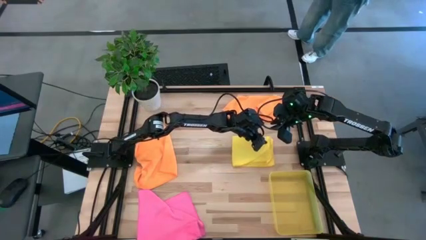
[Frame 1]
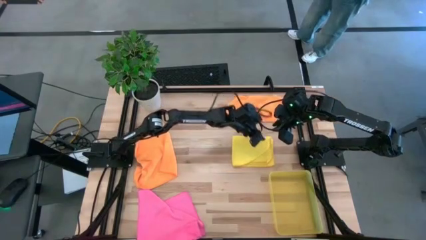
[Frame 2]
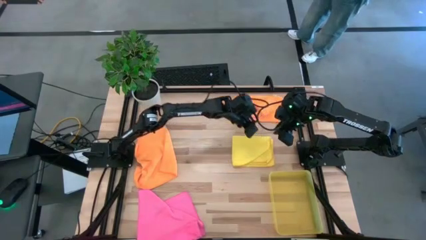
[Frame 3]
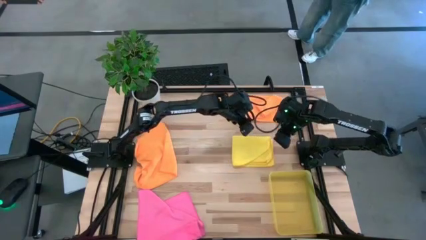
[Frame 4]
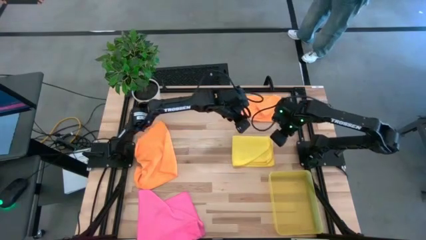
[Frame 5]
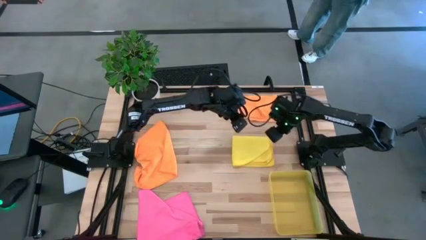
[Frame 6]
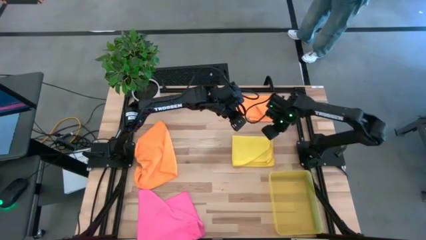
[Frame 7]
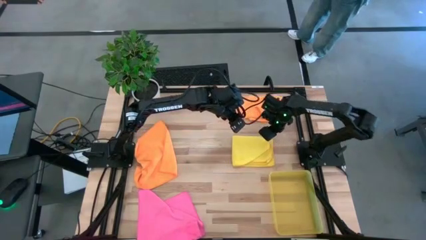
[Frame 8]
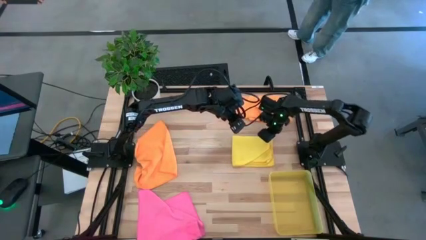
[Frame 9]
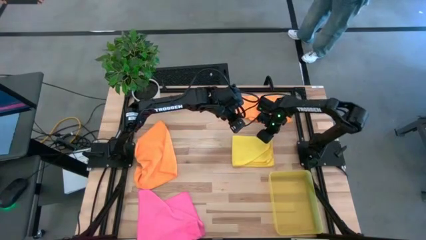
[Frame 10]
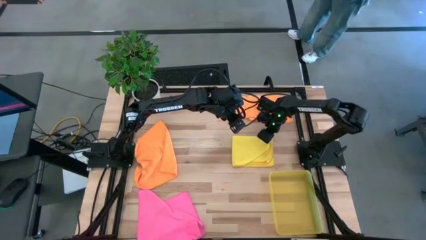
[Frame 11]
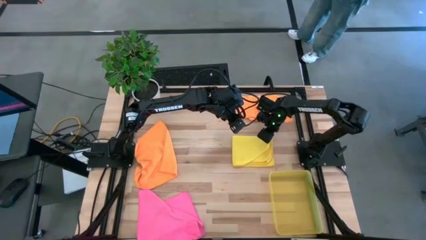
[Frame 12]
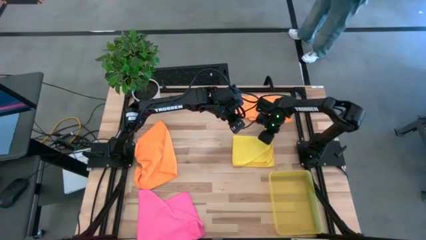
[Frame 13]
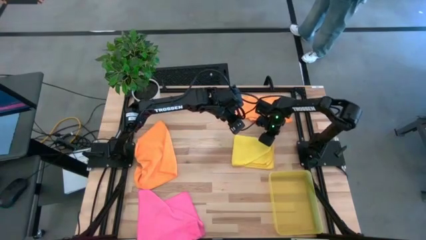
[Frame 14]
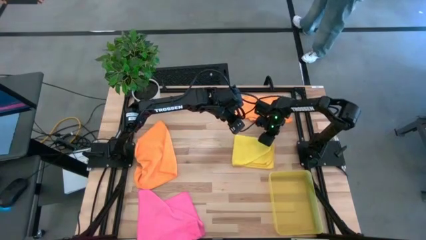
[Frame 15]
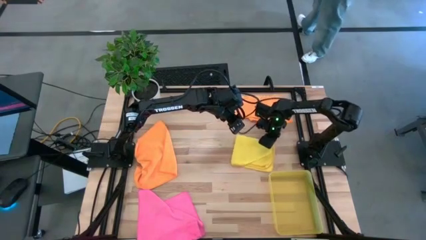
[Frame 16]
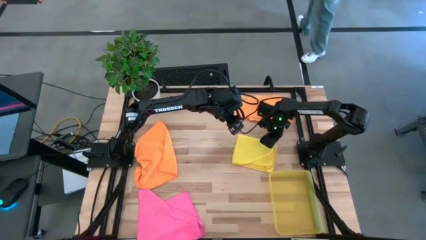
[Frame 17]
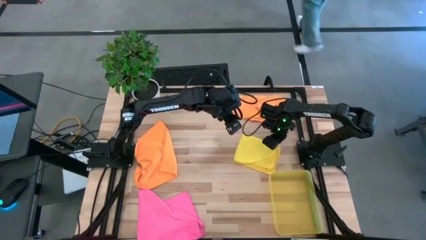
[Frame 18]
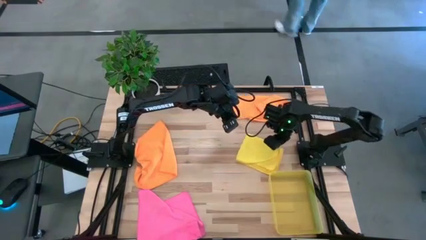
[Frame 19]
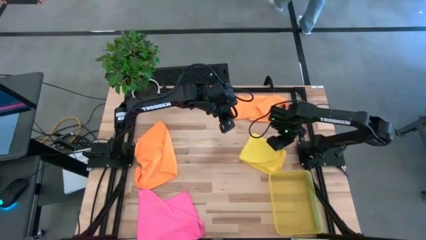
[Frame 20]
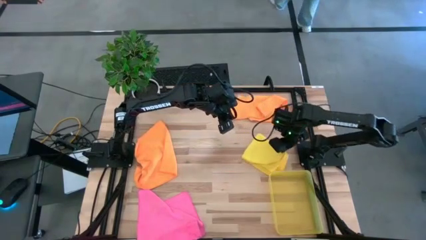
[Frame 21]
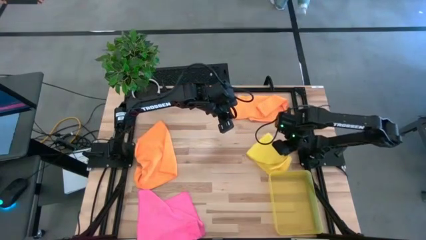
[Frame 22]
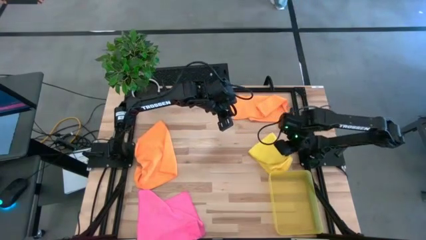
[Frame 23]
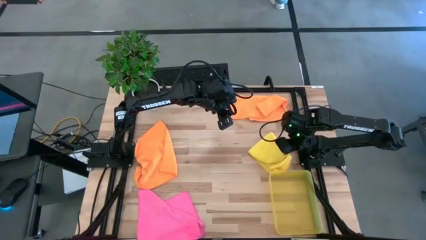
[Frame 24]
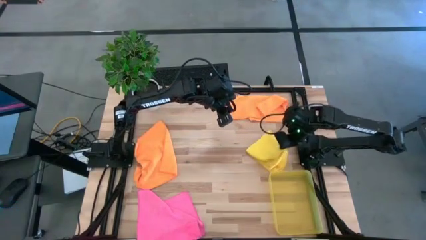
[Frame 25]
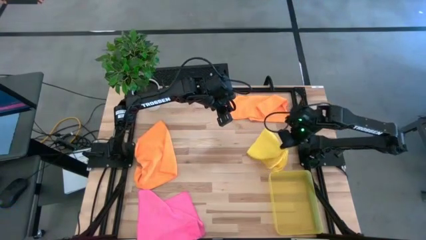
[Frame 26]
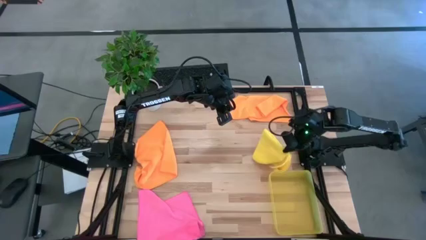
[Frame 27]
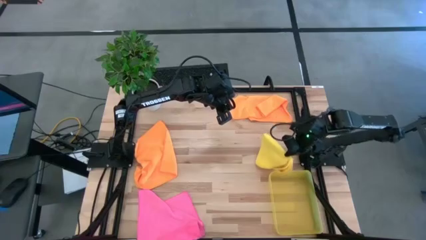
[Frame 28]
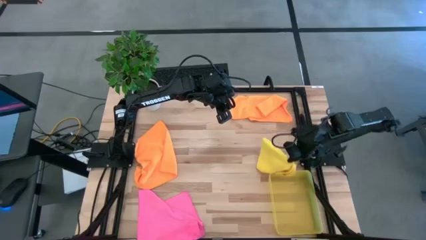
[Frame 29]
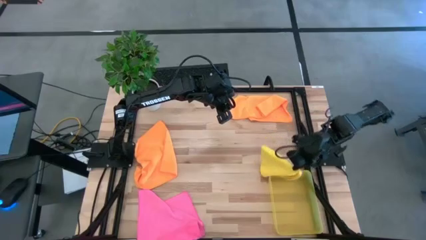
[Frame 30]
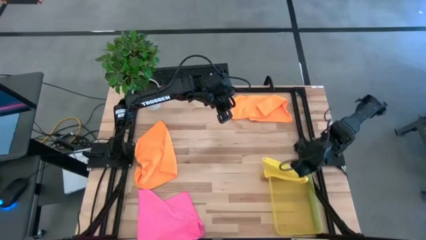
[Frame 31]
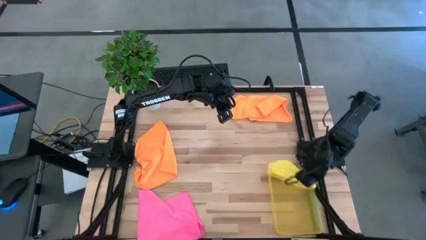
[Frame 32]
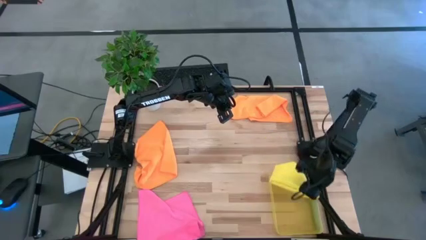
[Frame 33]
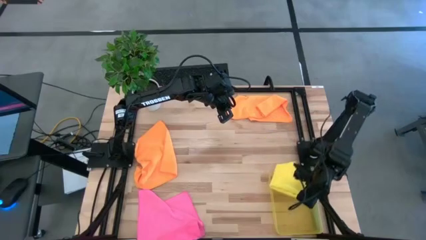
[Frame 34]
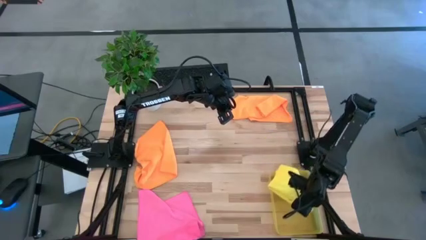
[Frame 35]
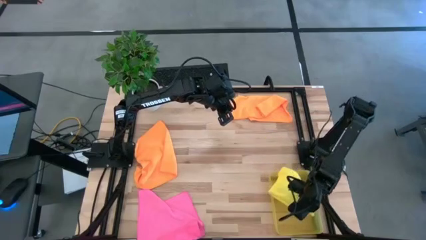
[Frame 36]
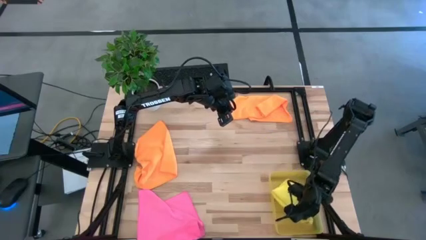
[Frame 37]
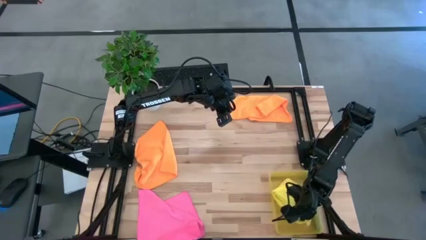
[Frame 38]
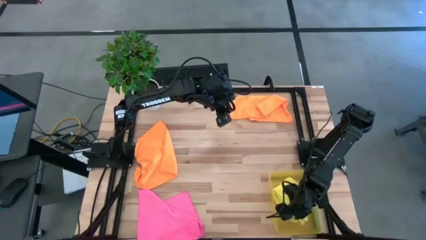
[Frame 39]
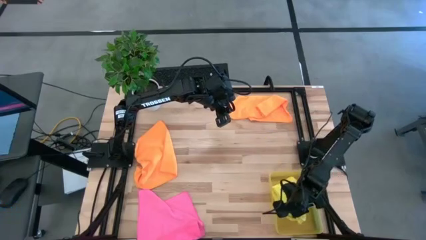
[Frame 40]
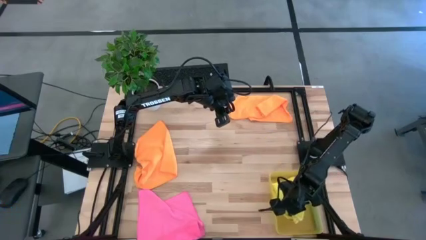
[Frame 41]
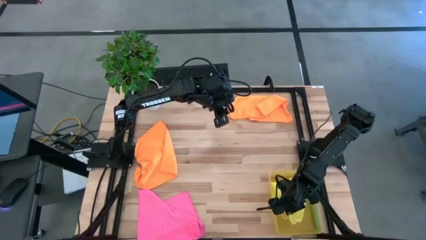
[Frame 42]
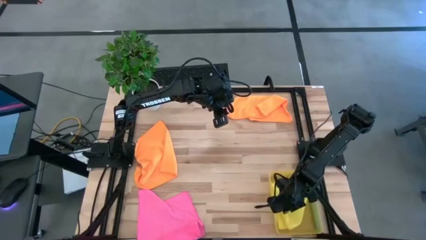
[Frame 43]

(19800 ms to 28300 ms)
Task: Fold microfiber towels
Put the folded yellow cloth into the yellow bin

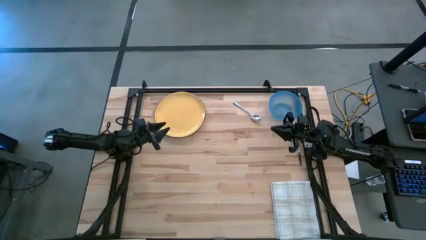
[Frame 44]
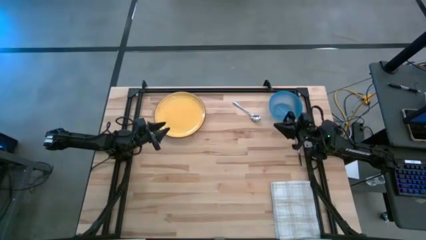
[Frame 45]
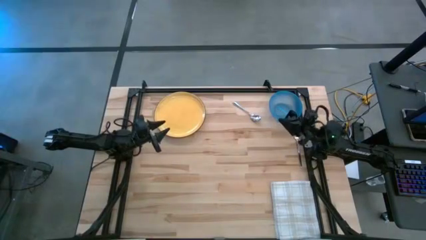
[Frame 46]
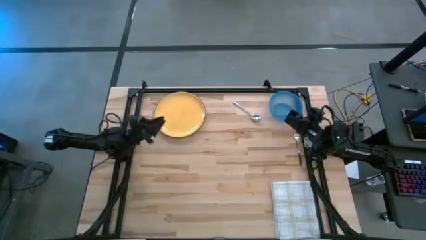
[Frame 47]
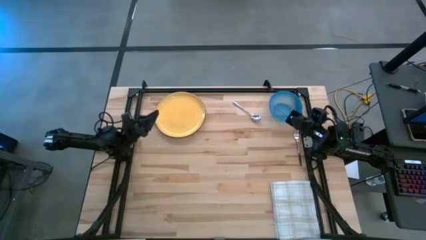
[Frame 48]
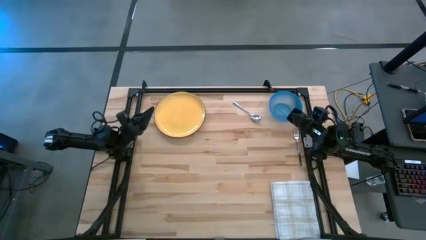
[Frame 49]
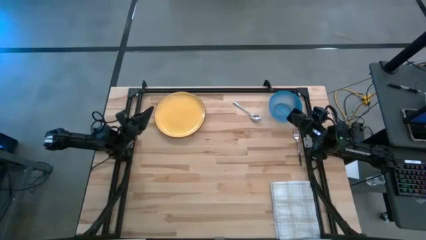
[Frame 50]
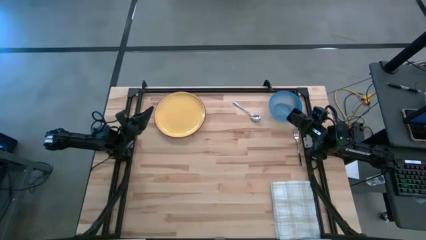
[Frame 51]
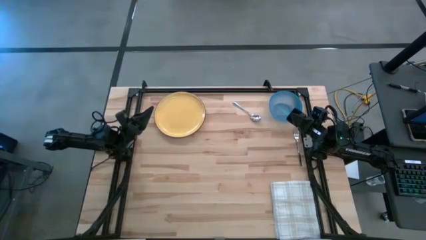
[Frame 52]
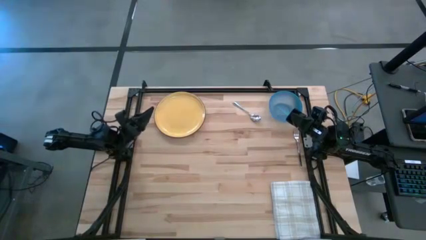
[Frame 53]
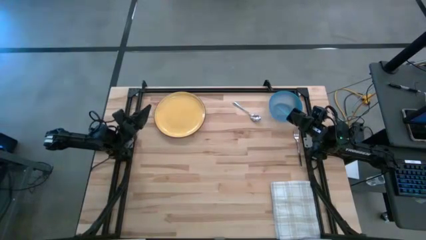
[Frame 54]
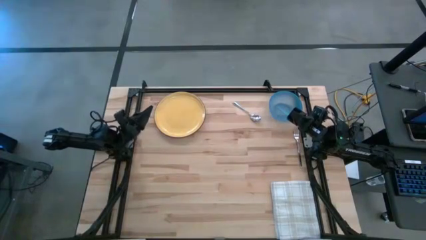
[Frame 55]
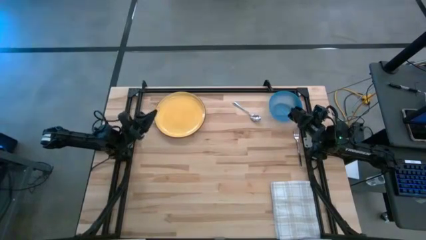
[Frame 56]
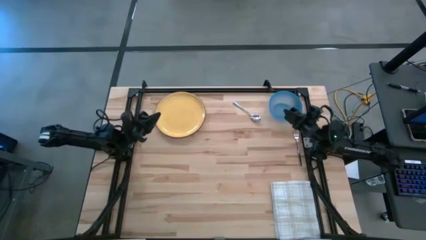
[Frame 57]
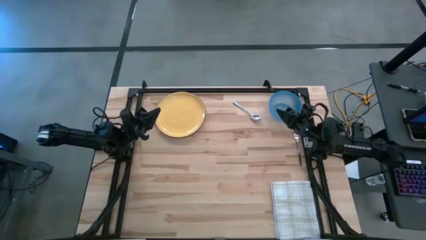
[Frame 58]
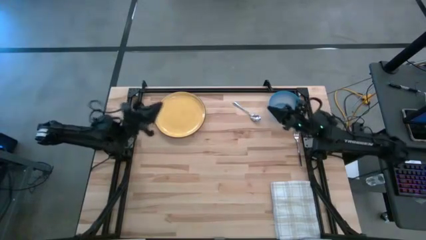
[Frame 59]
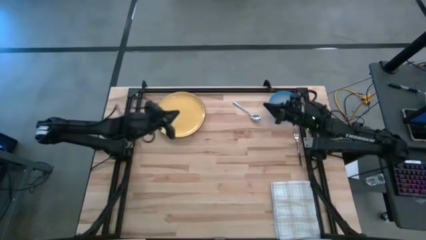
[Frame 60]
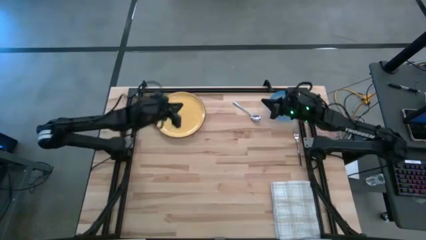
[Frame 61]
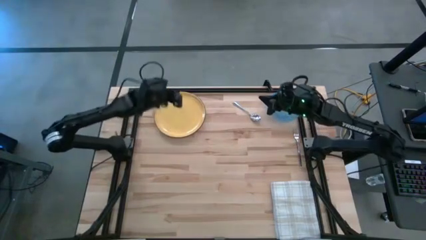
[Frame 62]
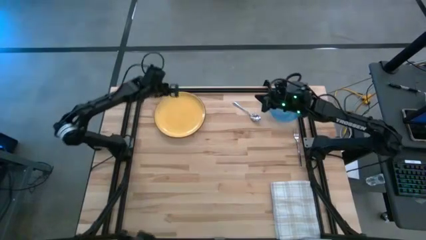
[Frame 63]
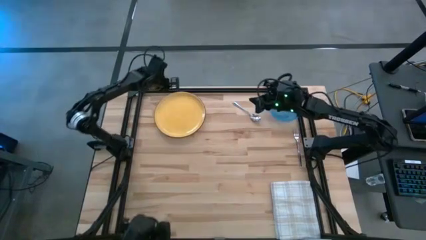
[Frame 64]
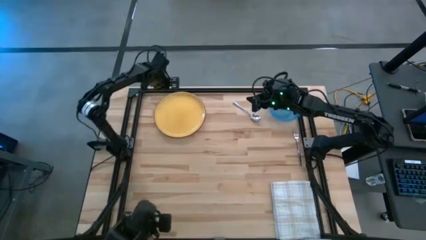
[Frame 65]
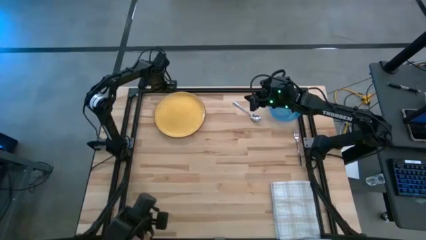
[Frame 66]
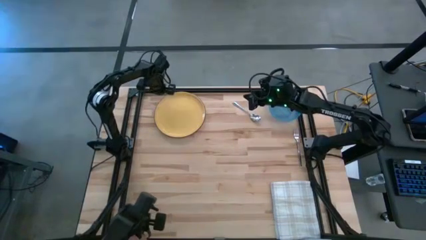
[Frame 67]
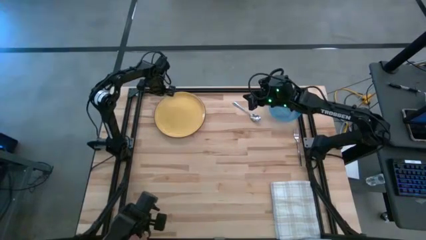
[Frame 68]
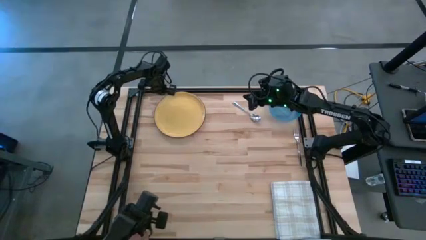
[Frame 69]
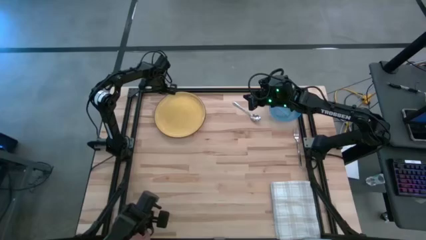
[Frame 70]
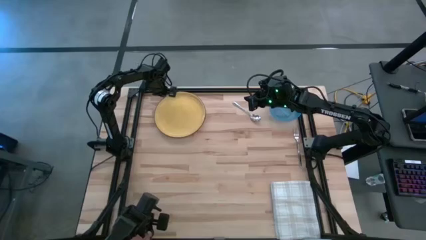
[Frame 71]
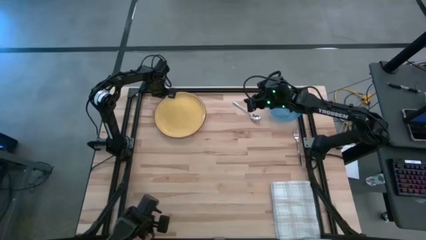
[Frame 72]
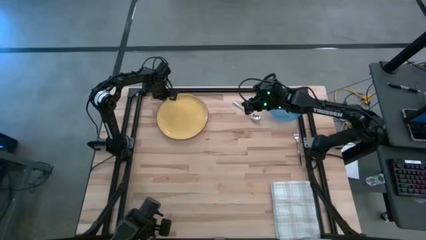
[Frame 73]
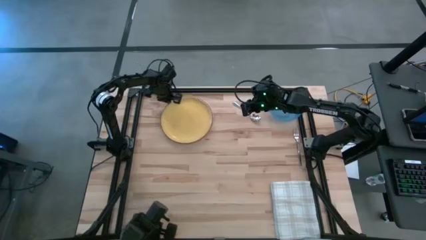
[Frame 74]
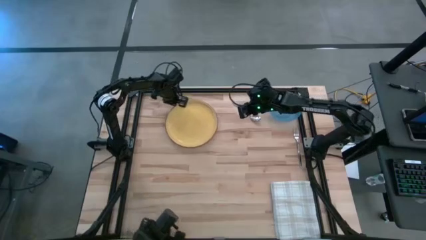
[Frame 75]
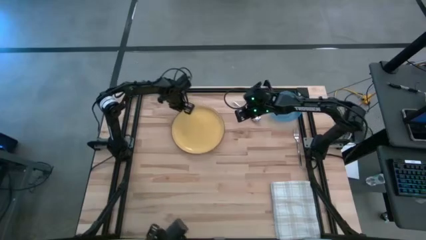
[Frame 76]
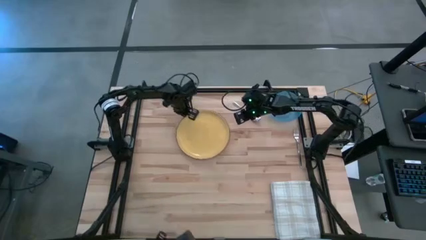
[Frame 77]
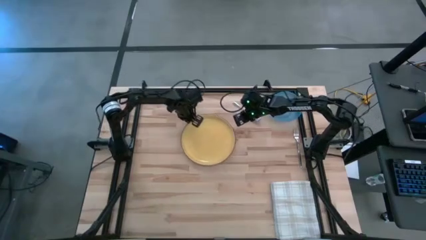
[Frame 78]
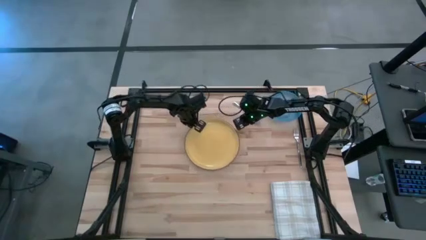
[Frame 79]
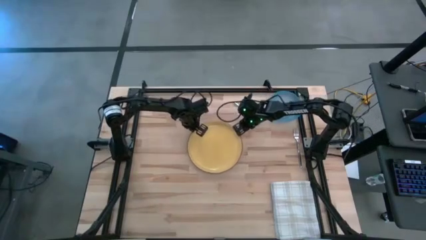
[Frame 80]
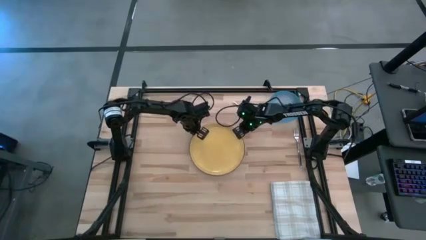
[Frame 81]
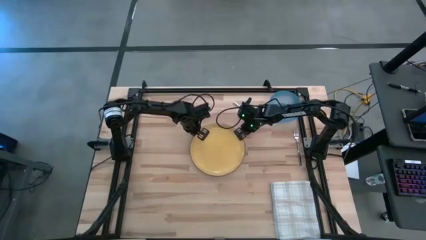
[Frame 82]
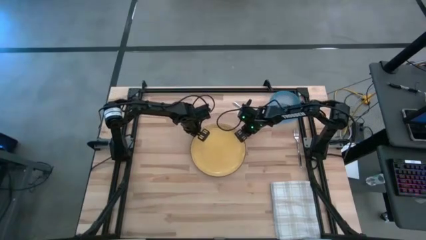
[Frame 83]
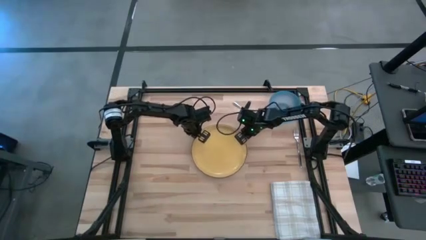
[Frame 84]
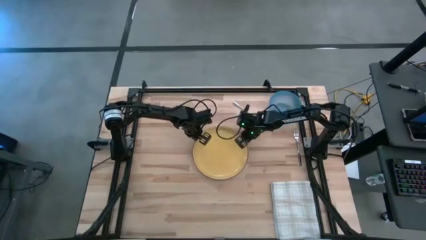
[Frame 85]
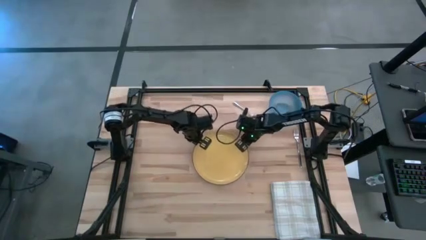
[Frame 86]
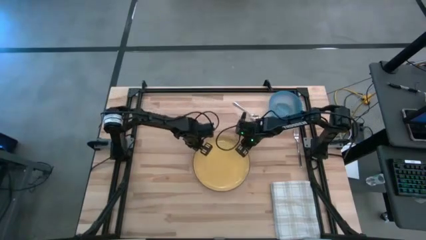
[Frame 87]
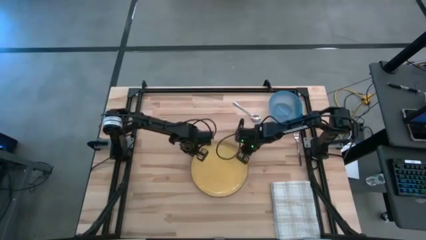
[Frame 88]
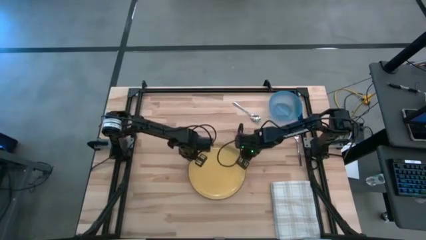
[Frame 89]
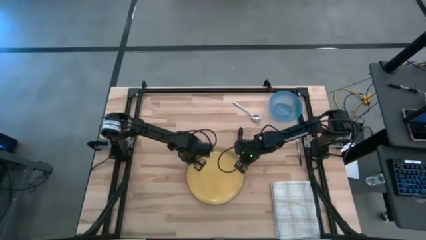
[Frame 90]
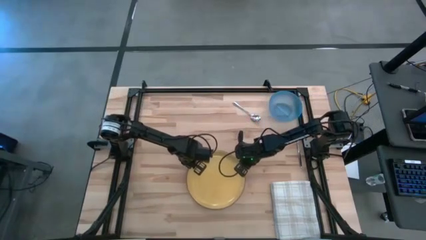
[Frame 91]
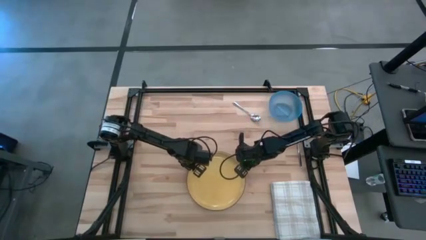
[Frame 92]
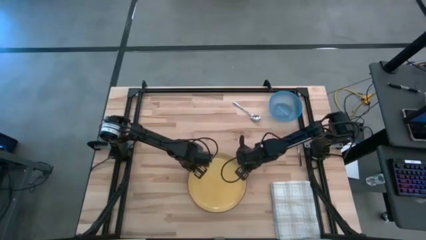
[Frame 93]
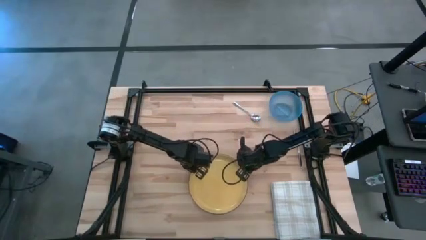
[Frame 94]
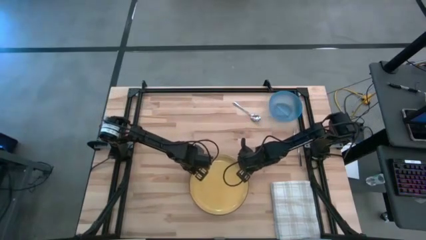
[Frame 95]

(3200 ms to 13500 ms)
Task: Set table place
Move the yellow plate to the center of the table
